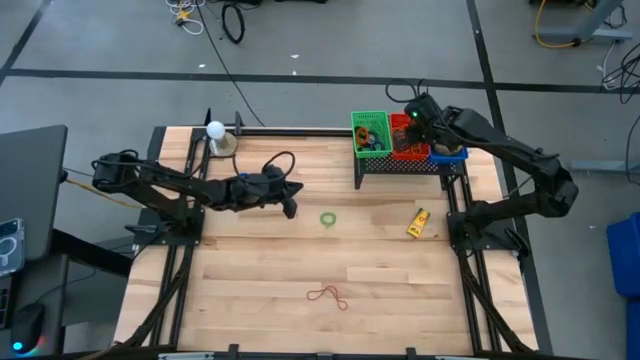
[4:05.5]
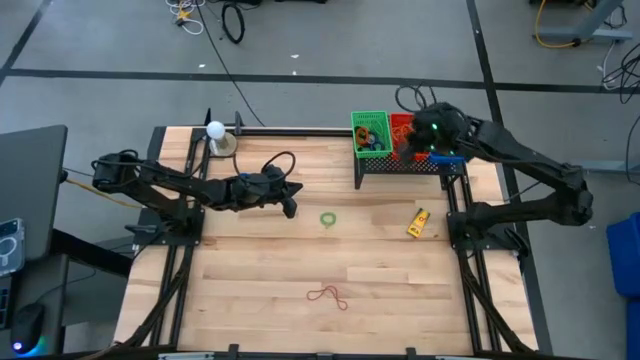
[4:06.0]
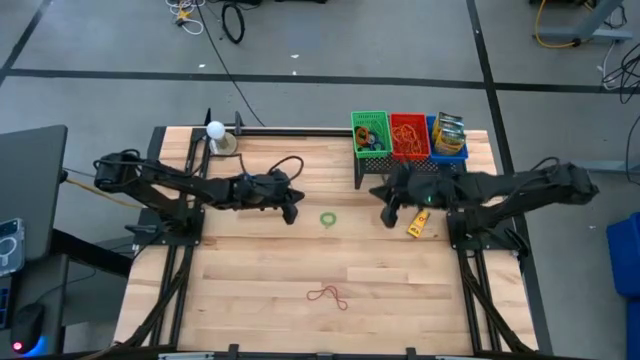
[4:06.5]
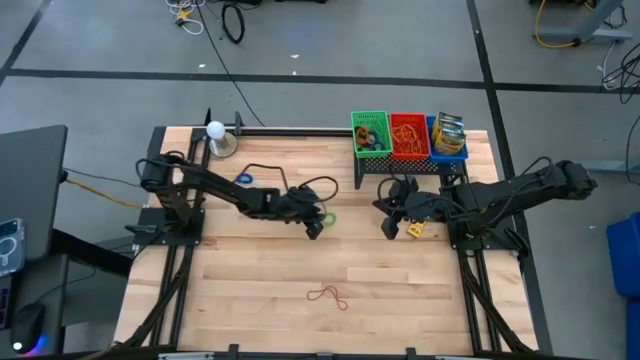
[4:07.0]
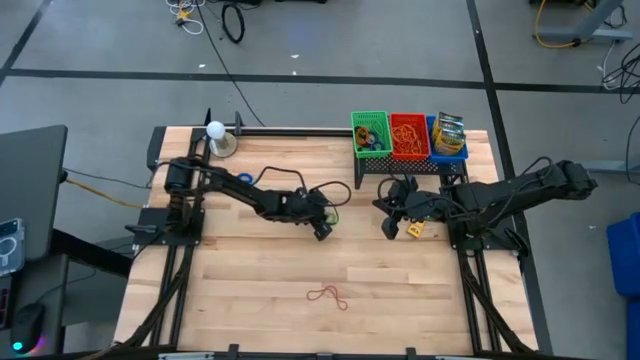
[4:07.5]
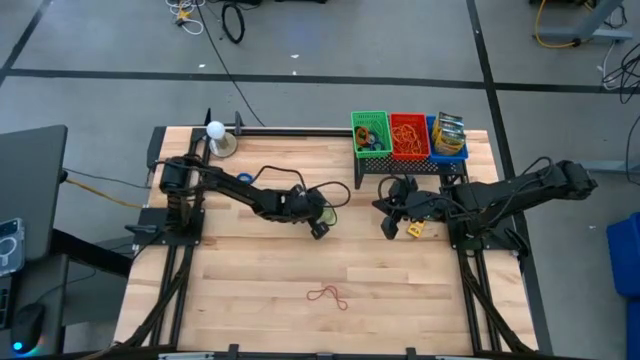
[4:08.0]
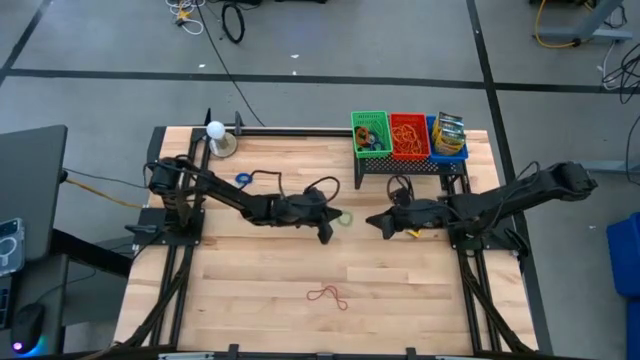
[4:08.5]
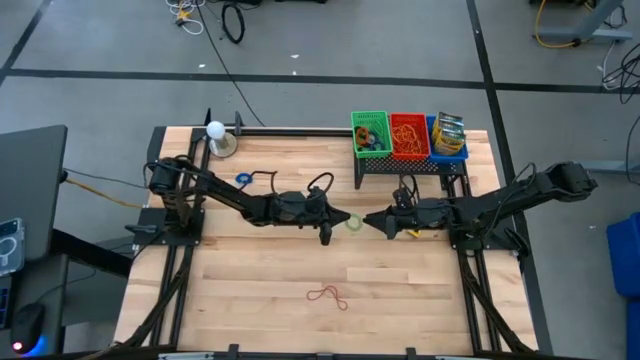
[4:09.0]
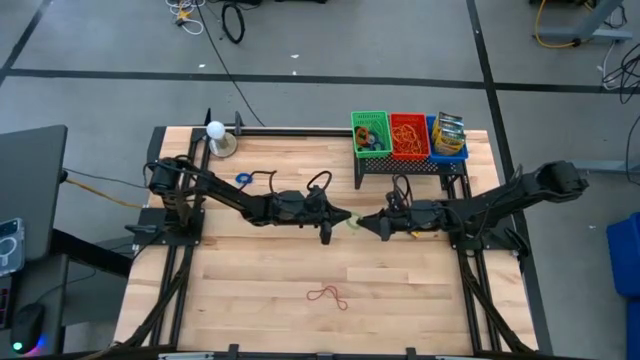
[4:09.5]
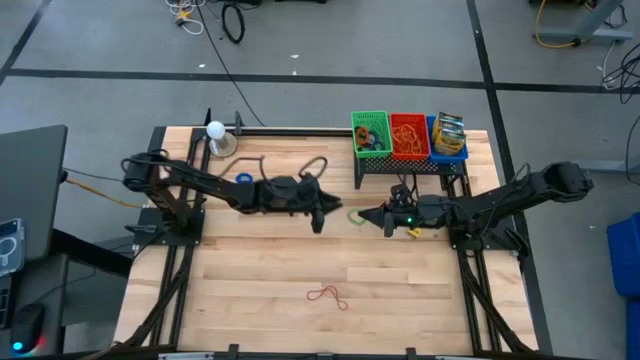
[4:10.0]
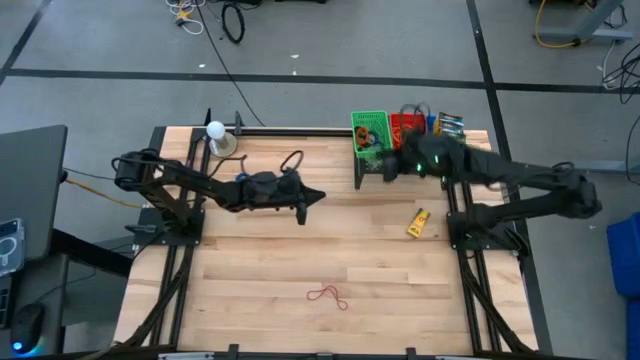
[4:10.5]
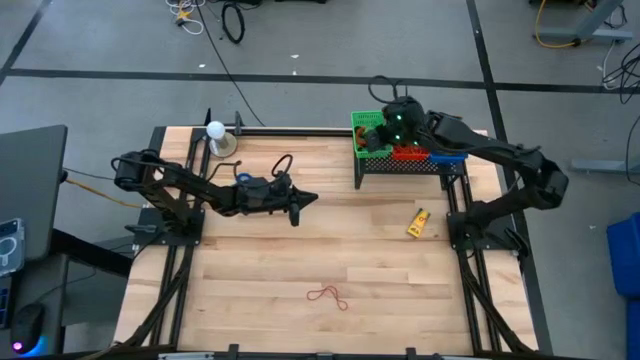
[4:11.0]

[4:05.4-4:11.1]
Task: Pick & Place Office Desk Supplies
Put the green spring keychain into the green bin

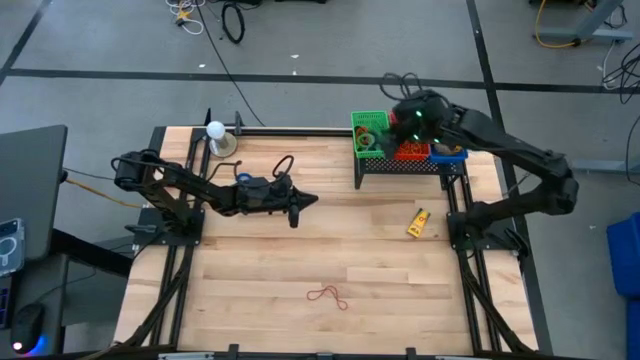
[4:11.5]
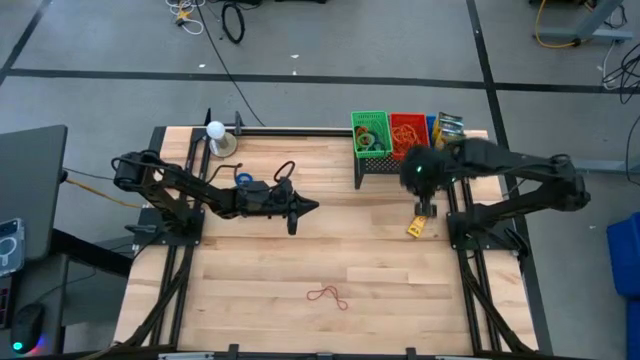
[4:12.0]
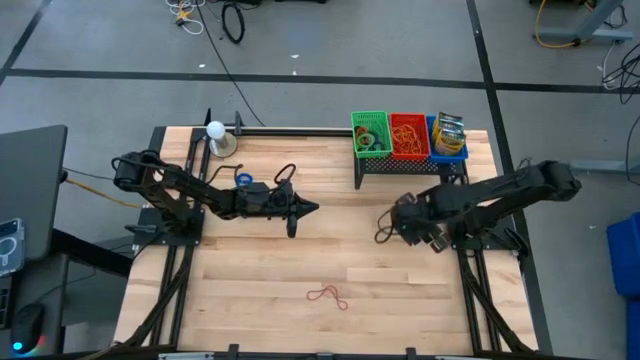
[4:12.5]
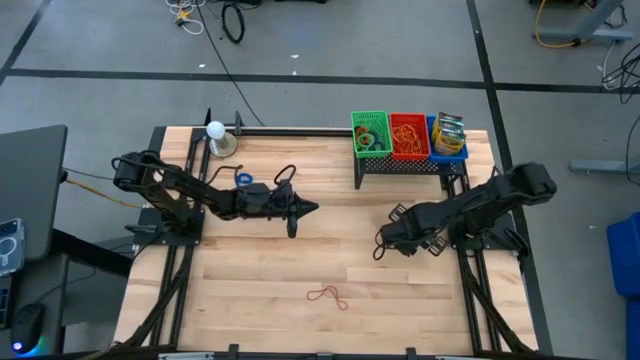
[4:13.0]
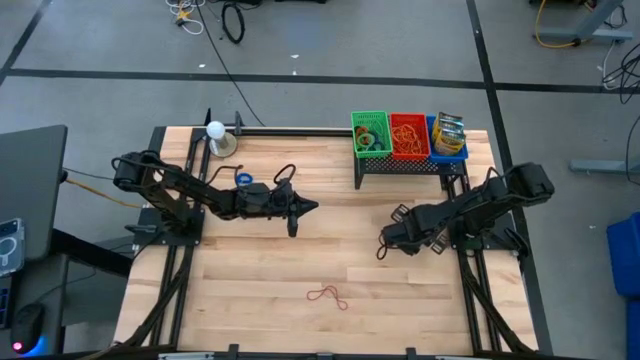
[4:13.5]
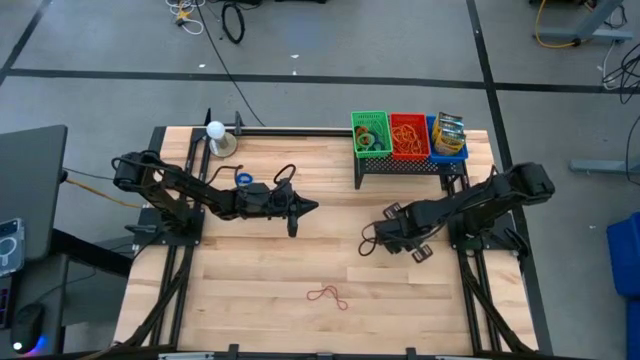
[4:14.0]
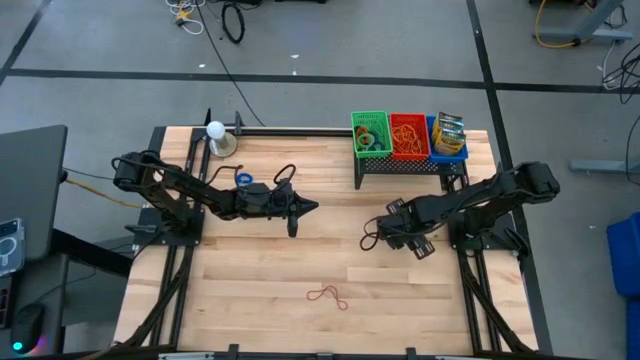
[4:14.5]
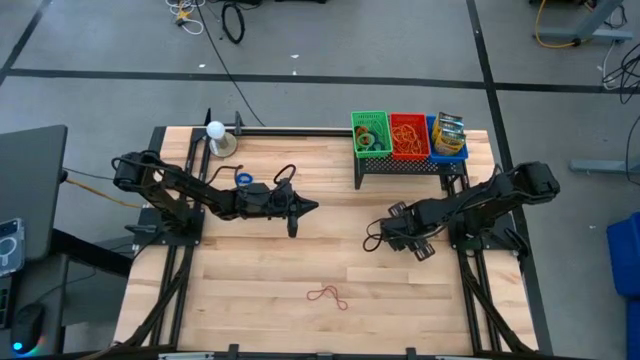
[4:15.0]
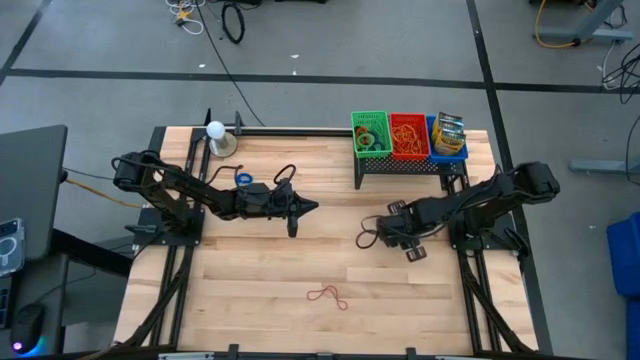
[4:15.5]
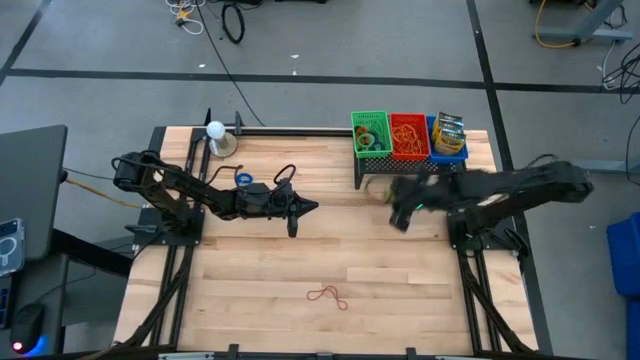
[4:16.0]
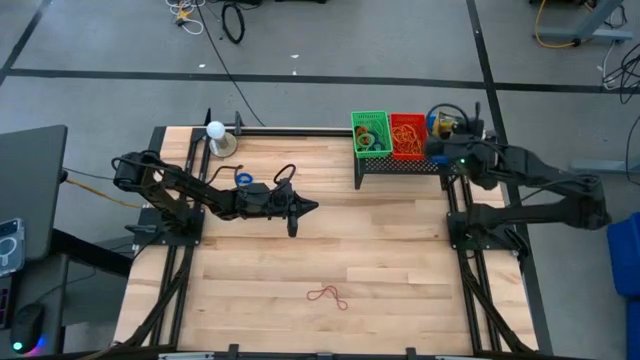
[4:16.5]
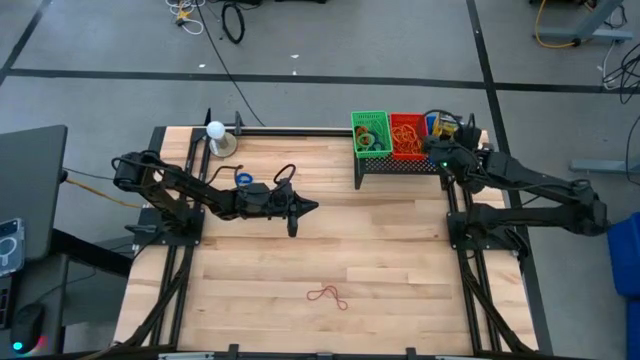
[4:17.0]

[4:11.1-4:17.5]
Put the small crayon box into the blue bin

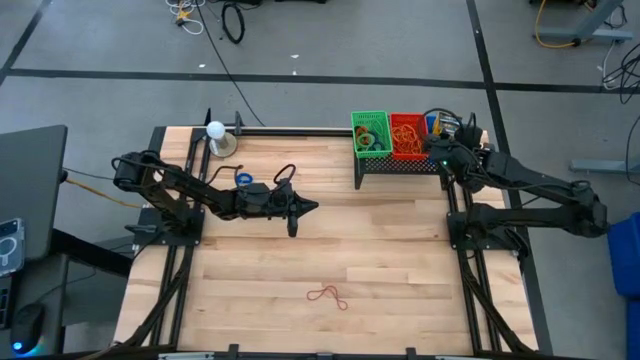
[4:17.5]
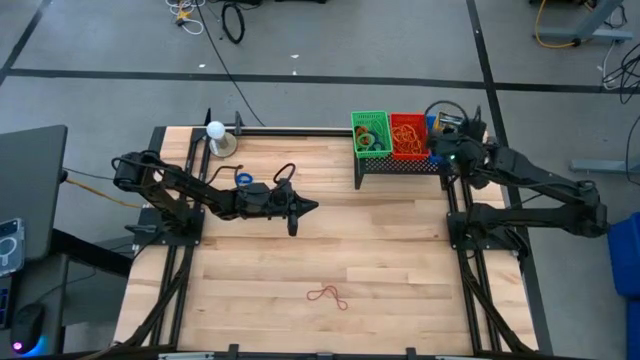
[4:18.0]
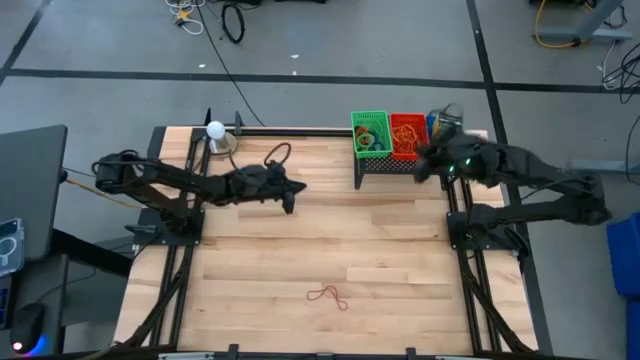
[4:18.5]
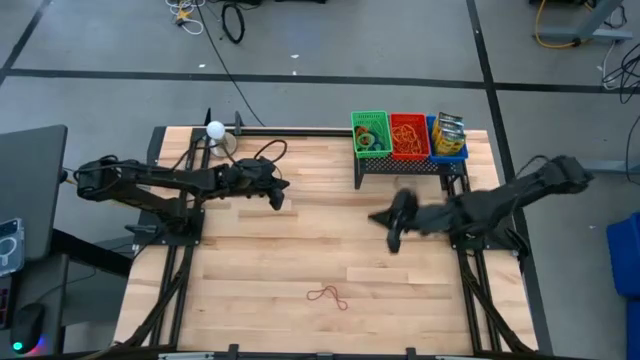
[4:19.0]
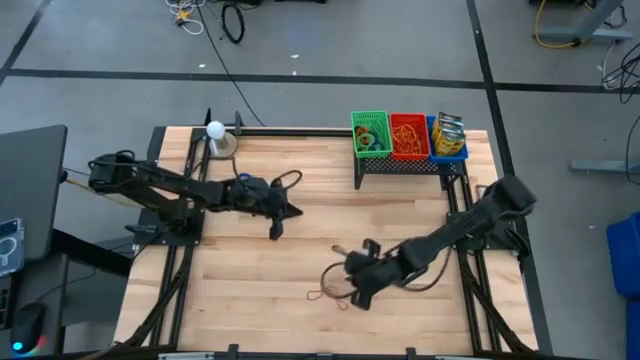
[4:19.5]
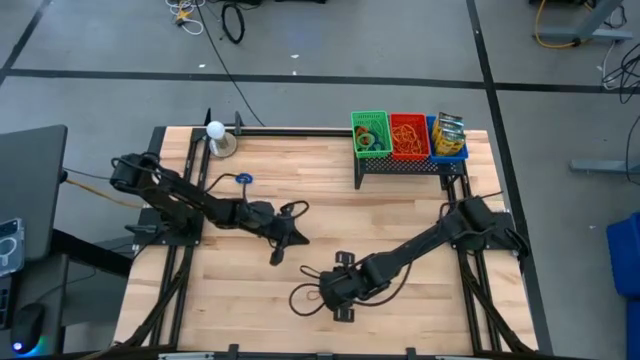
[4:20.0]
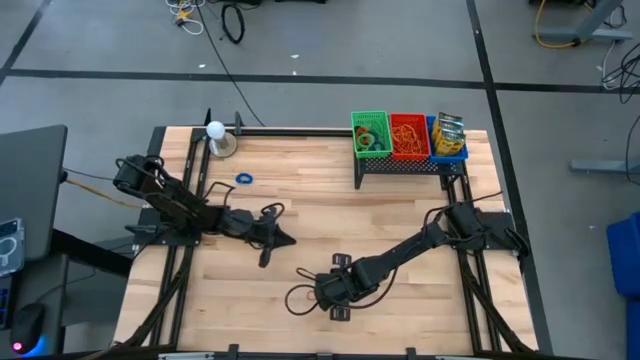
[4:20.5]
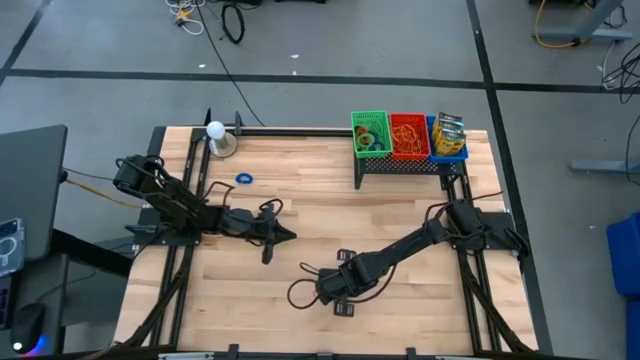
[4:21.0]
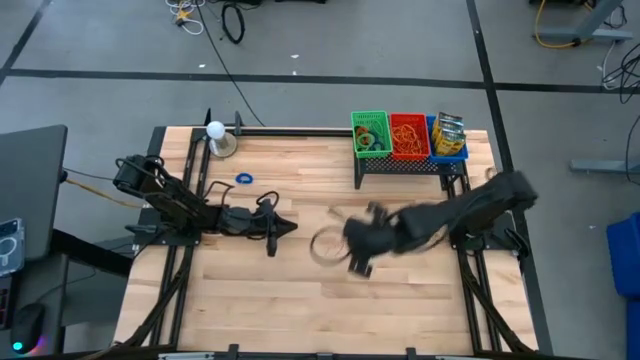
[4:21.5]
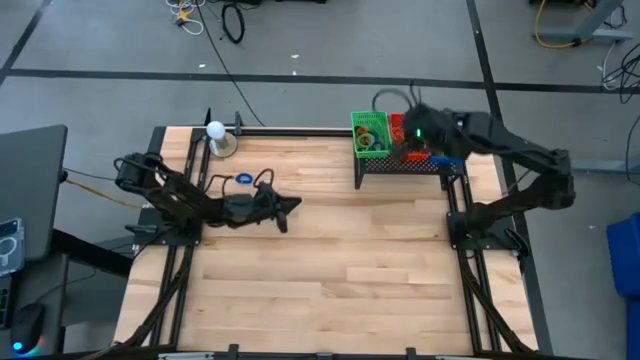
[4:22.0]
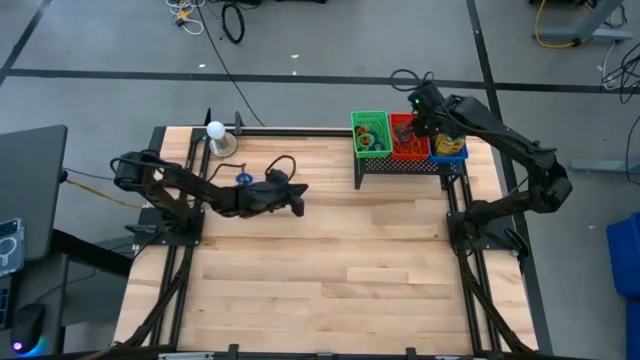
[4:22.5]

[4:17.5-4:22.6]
Put the red rubber band into the red bin

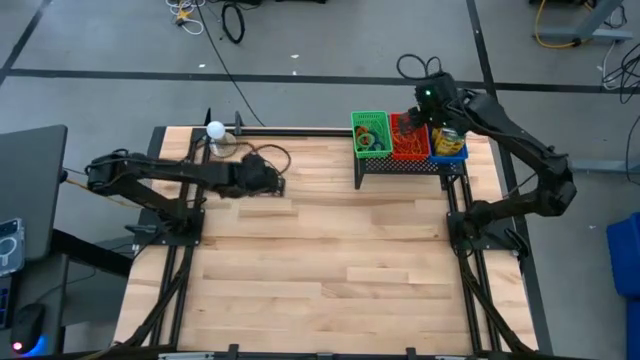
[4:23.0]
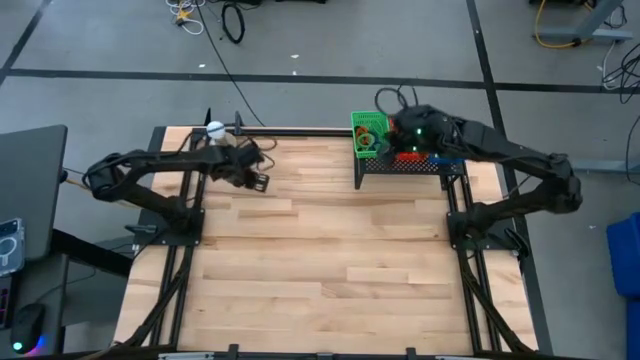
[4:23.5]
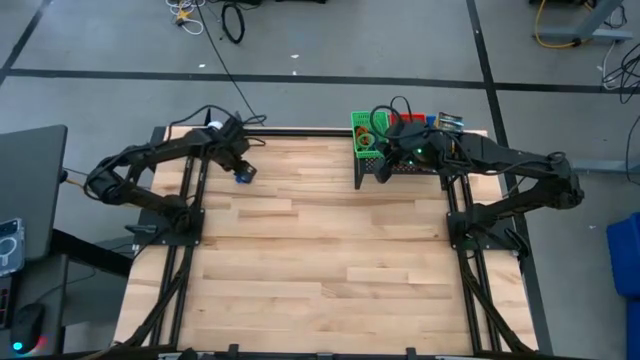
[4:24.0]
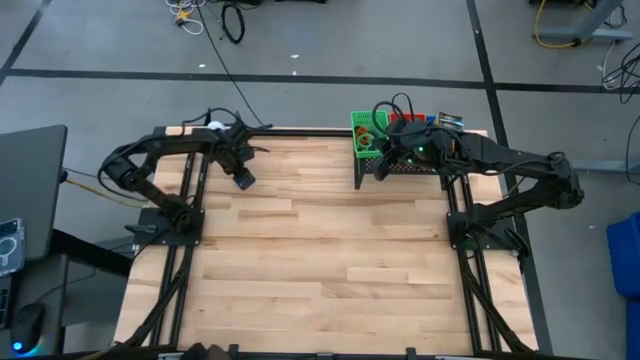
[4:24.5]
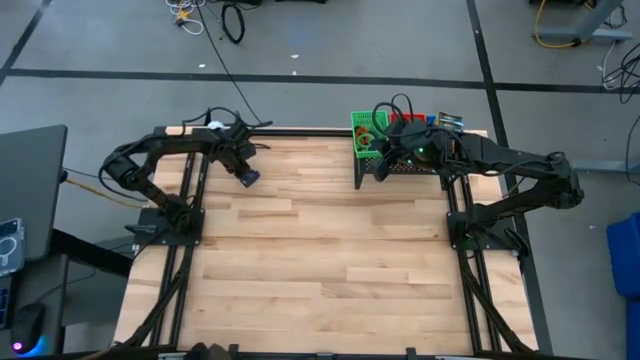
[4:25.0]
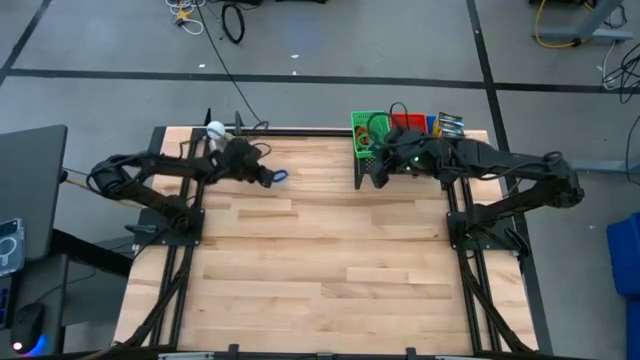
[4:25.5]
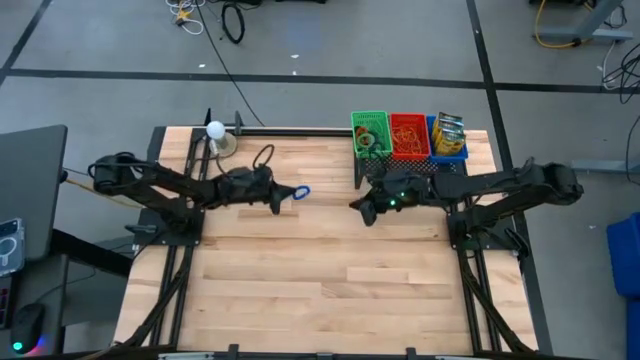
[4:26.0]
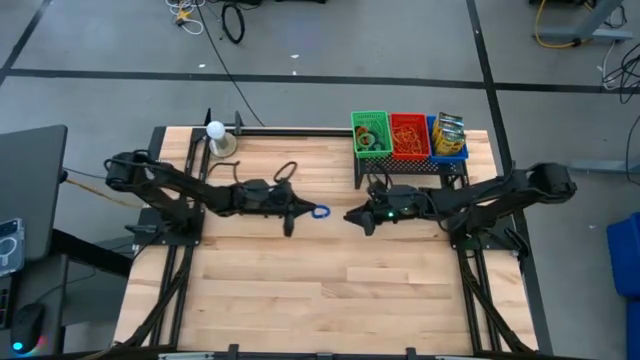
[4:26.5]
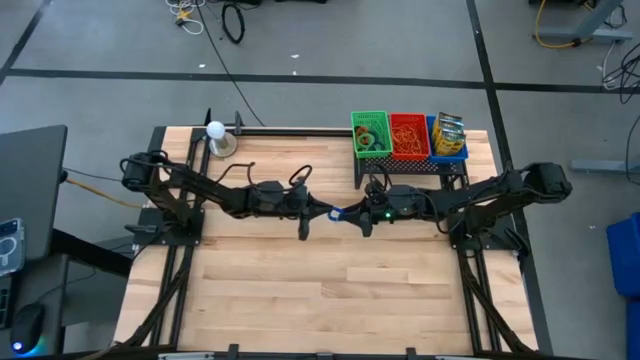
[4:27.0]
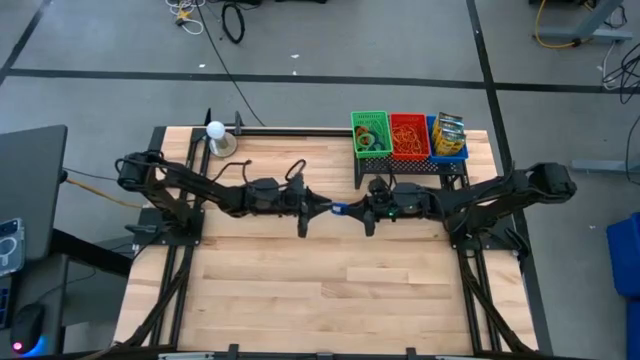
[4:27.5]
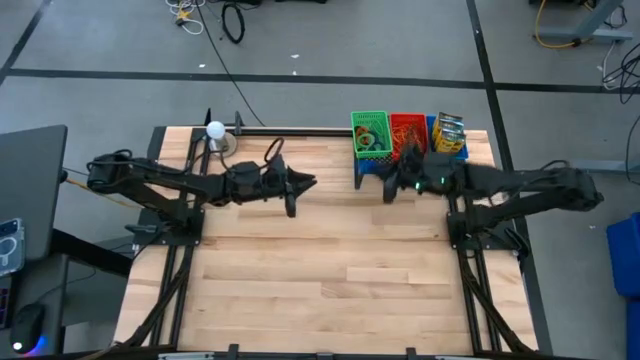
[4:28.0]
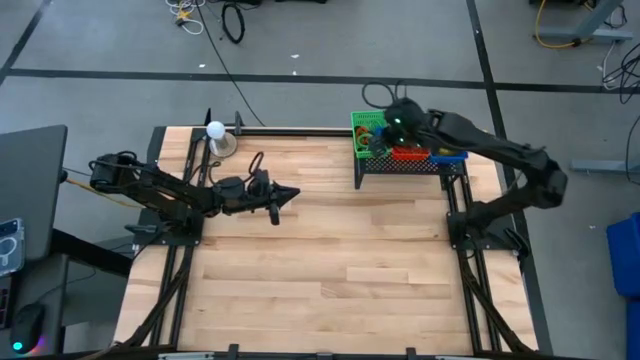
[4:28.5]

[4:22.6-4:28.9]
Put the blue spring keychain into the green bin
